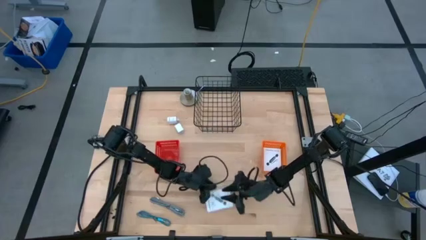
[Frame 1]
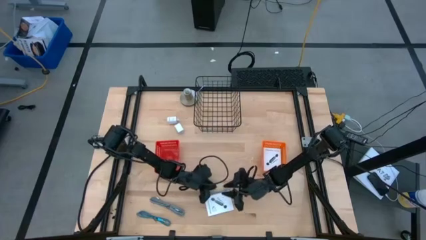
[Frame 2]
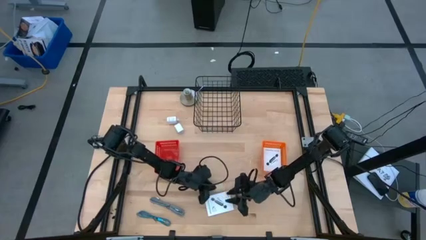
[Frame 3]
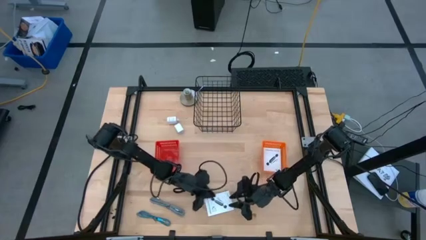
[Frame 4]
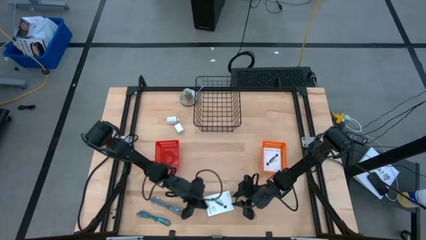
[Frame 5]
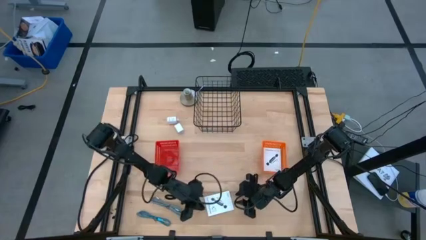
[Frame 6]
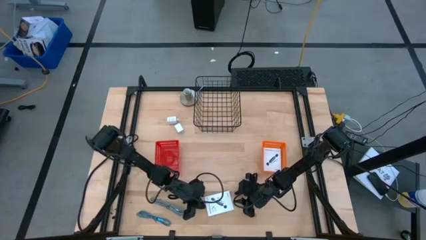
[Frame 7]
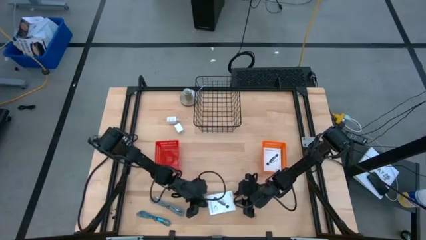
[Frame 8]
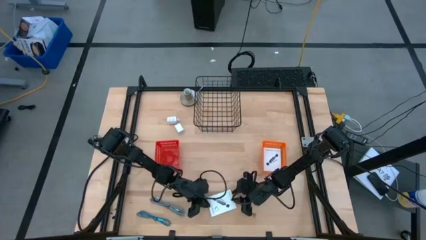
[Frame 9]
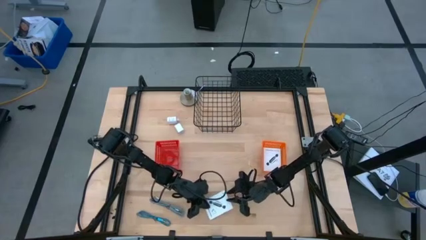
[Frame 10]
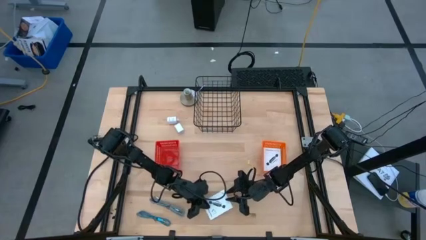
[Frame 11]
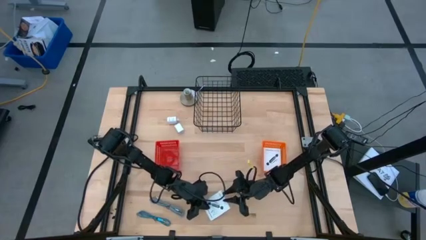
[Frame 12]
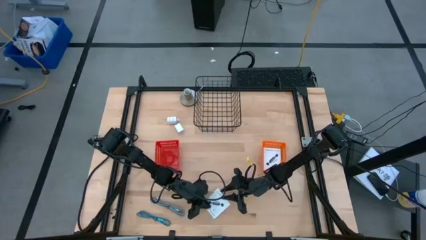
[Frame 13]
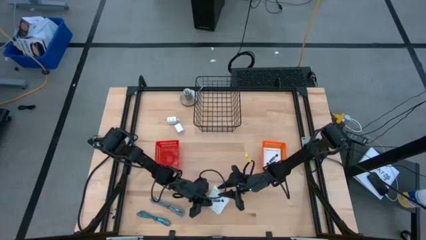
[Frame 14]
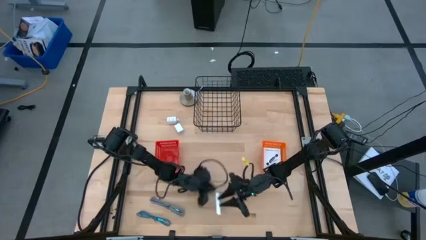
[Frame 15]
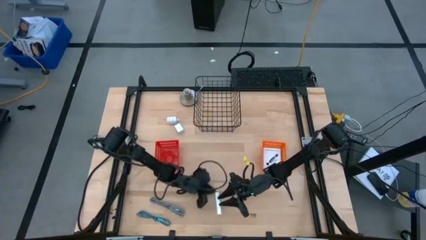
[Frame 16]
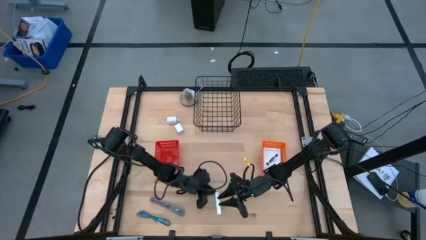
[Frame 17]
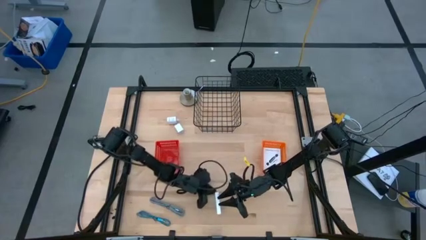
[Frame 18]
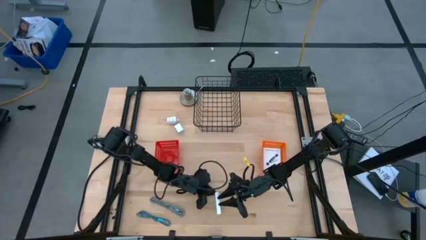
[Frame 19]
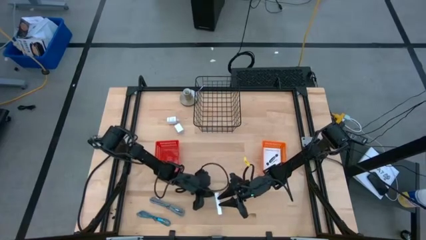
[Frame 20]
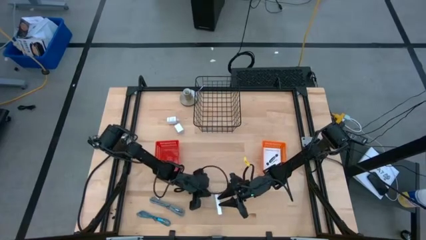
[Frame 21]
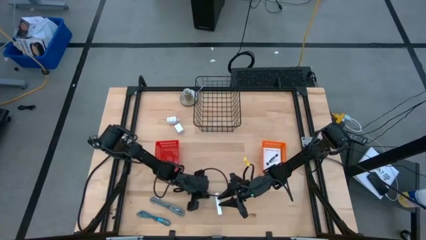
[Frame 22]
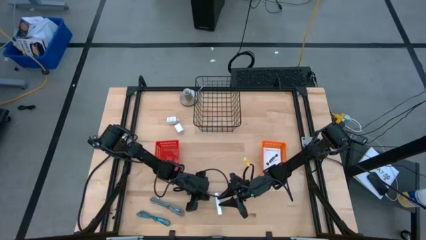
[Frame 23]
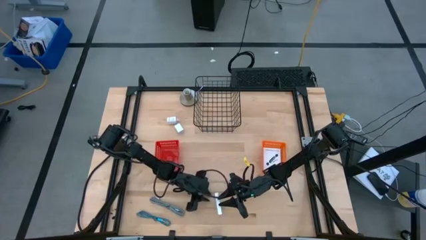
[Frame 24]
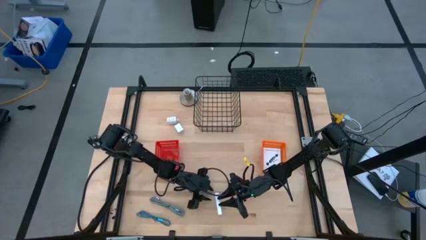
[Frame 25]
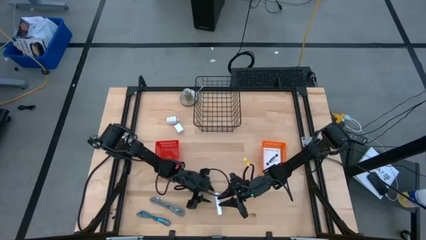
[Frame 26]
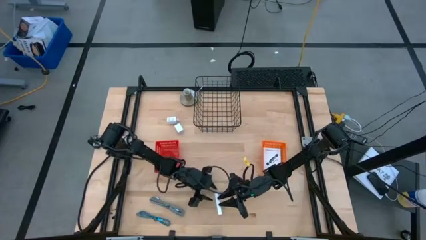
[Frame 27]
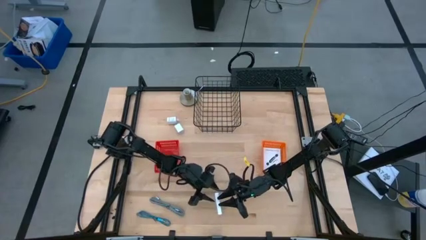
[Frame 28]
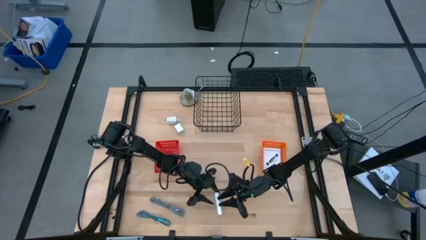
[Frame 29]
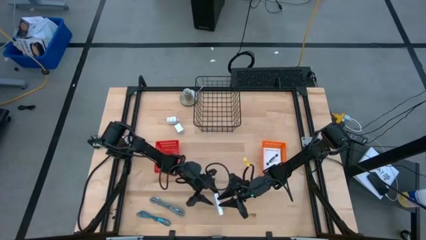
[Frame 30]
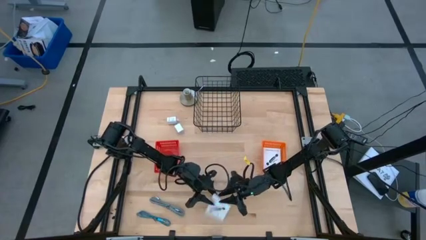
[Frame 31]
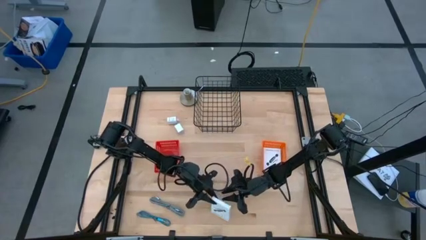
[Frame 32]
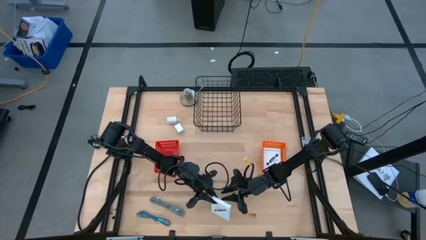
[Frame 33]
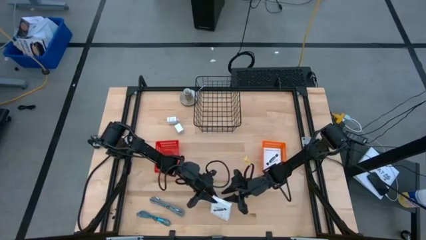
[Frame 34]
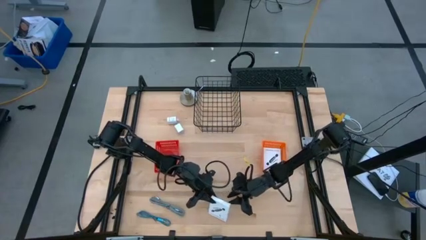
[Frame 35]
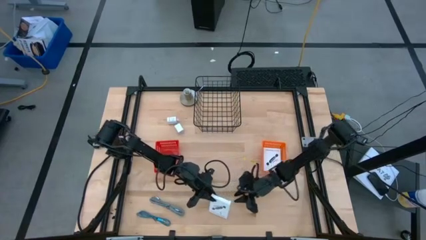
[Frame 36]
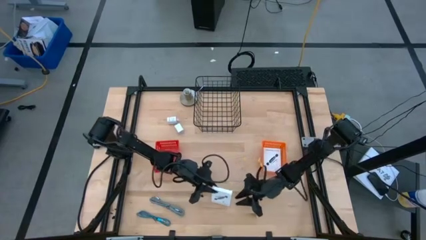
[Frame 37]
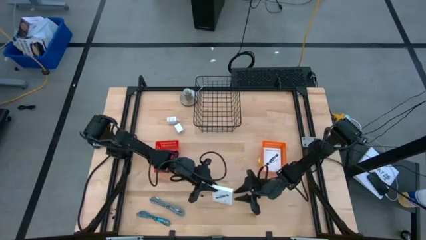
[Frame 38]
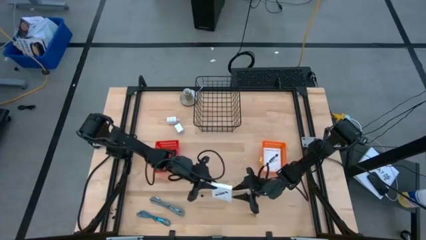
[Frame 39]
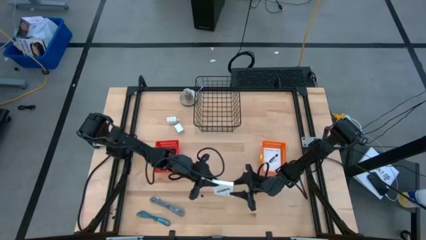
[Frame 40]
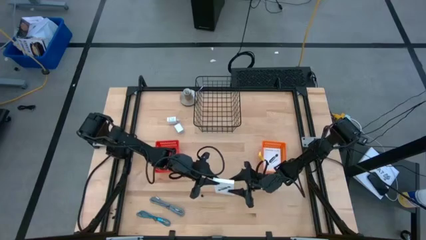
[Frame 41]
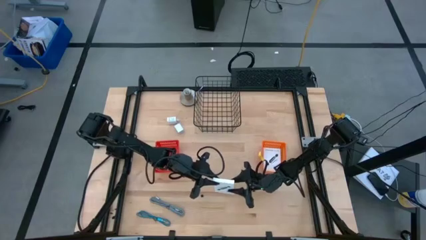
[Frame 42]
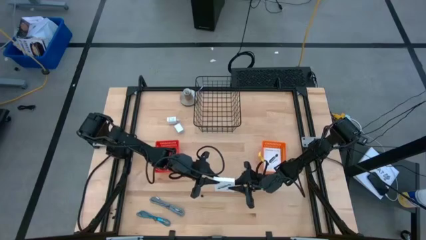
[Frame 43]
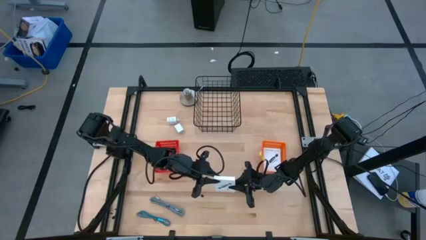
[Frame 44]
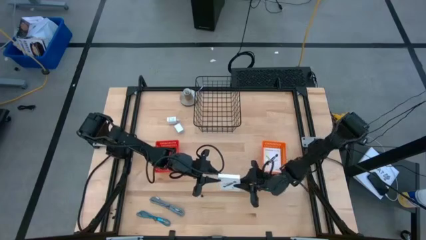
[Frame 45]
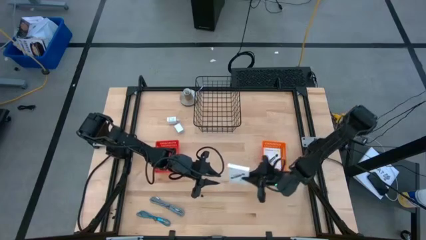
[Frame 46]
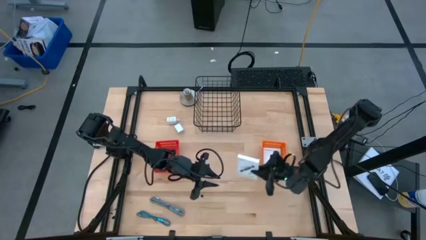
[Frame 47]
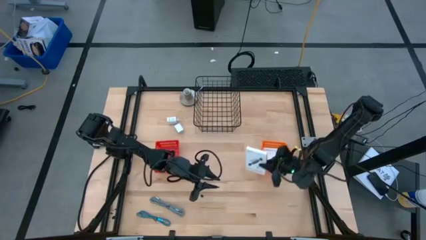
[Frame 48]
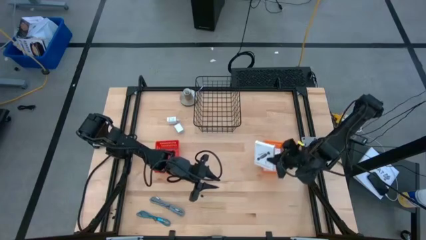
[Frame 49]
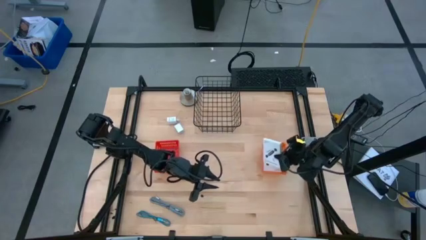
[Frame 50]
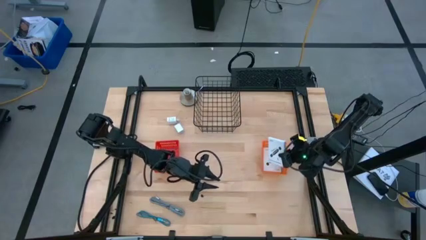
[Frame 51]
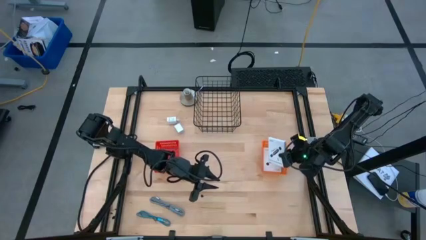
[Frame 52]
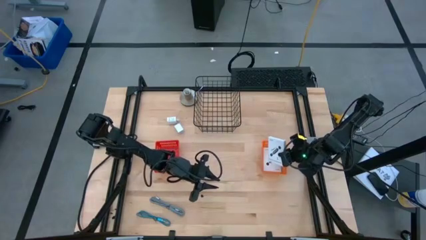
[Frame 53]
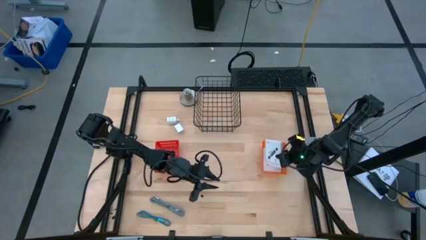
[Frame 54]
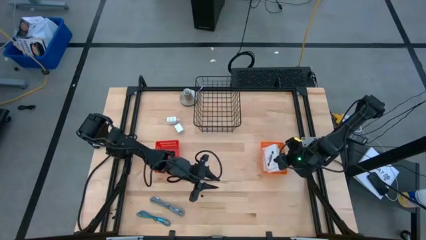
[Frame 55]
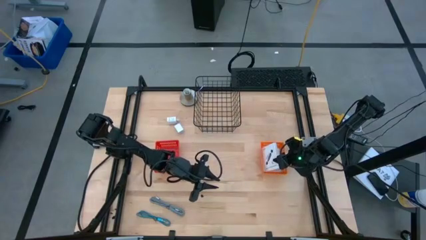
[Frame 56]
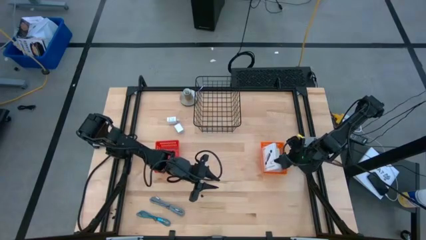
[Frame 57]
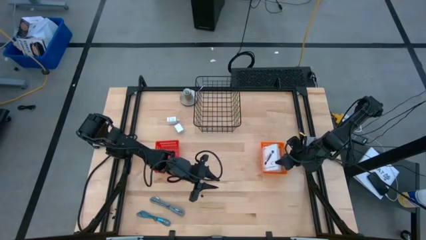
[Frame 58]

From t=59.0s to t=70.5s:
Task: Pick and place items into bin
Put the card reader box into the orange bin

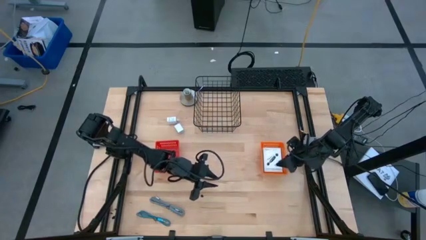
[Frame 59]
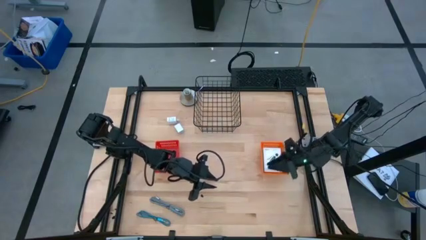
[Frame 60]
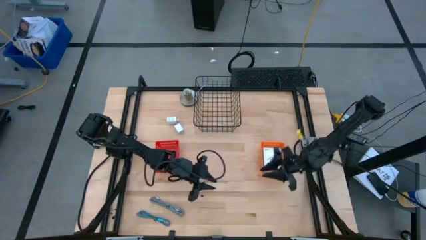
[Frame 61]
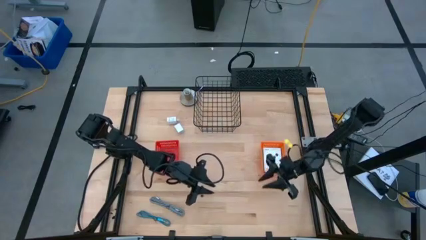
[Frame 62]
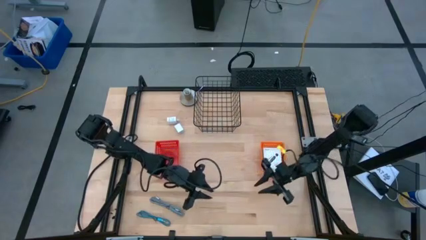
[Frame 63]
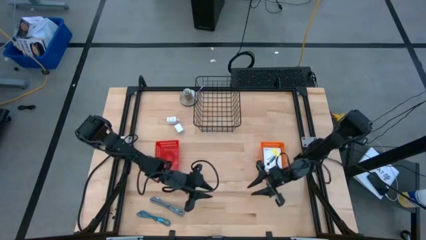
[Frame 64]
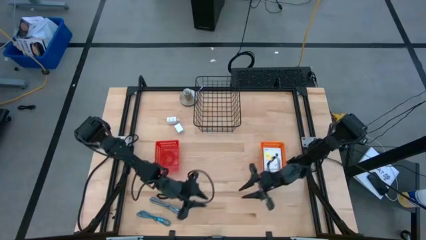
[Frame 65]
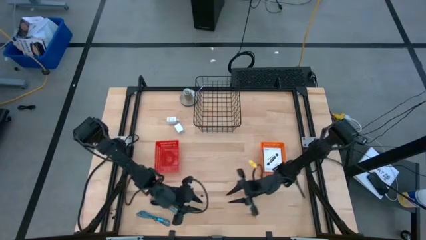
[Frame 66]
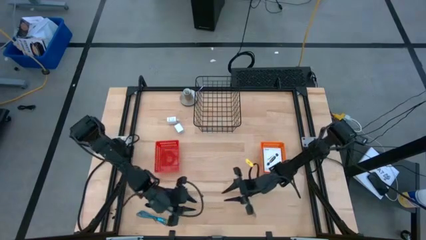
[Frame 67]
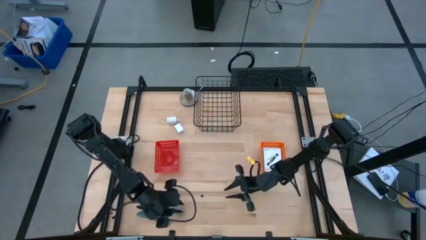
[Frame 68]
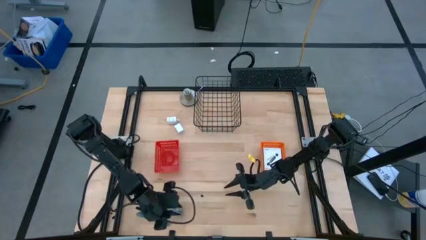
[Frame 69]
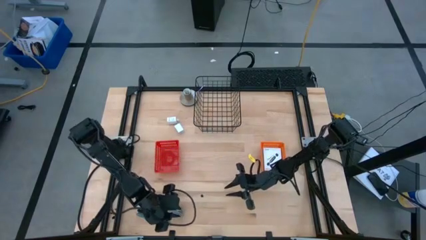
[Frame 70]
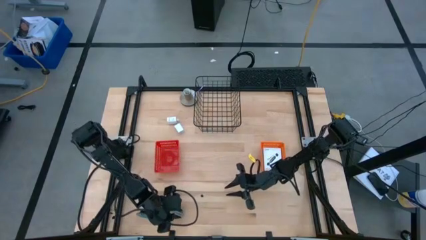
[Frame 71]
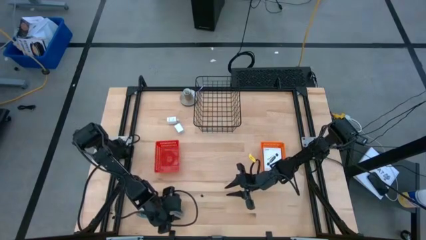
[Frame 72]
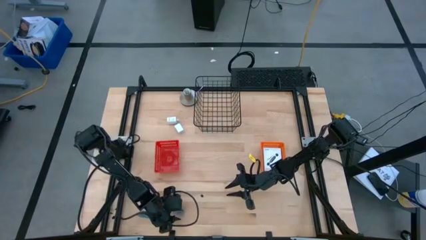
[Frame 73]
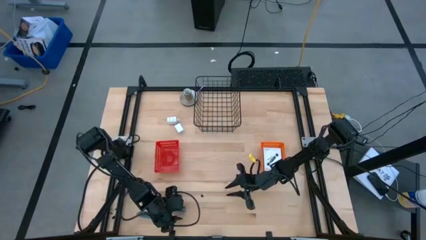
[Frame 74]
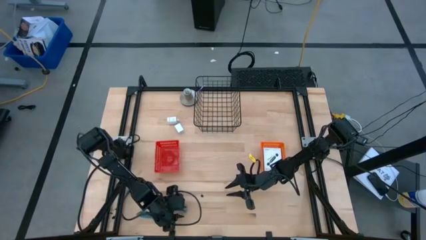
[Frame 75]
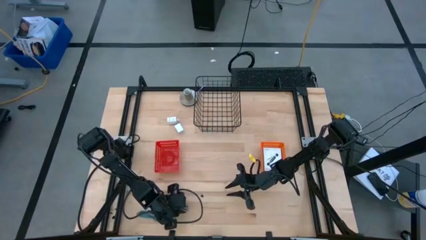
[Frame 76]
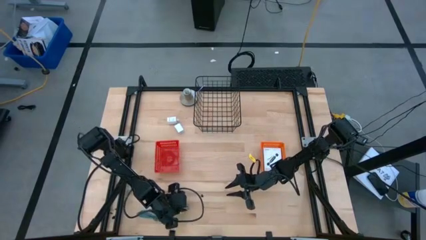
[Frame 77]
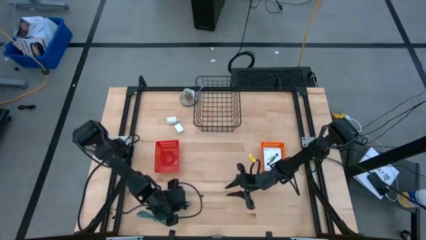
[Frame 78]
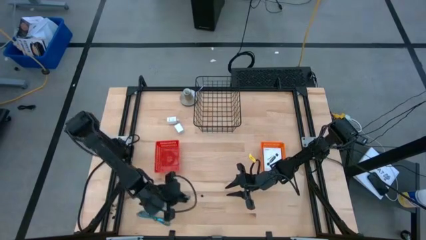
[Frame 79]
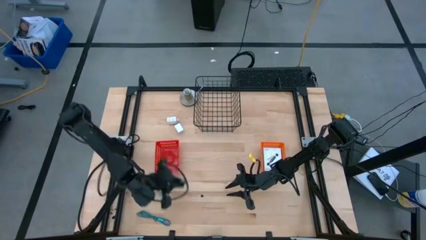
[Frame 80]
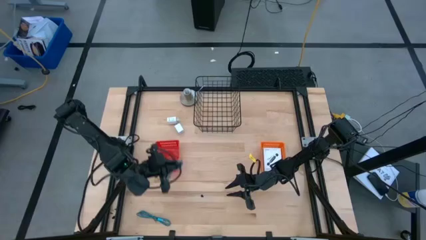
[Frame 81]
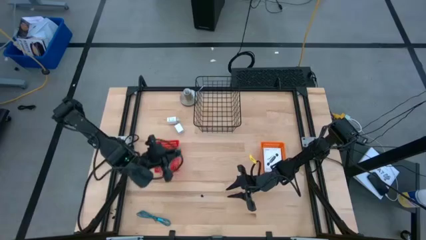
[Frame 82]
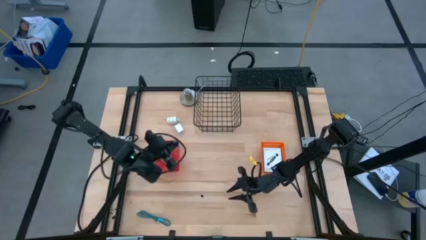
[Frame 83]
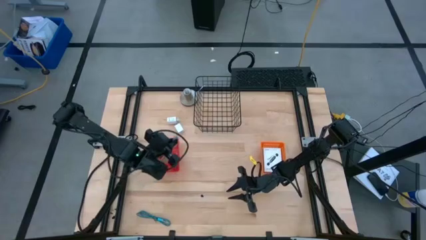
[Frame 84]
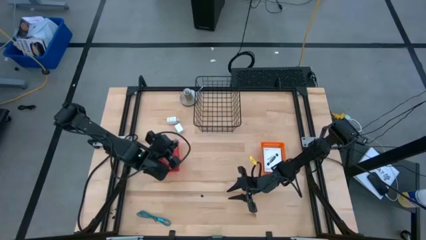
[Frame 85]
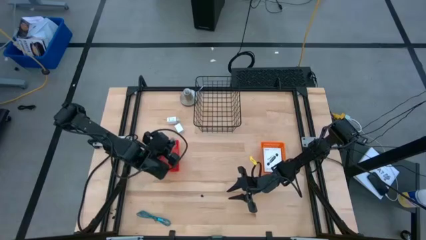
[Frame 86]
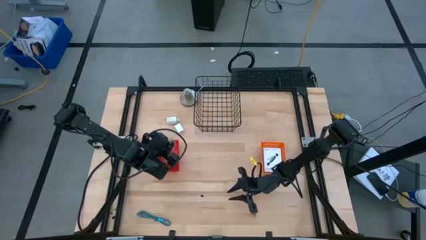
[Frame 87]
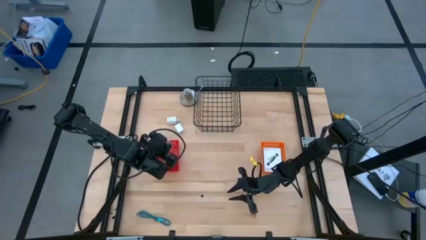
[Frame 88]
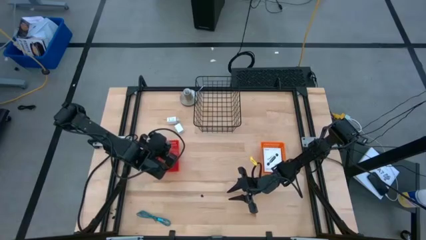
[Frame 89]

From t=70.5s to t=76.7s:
Put the black charger cable into the red bin
